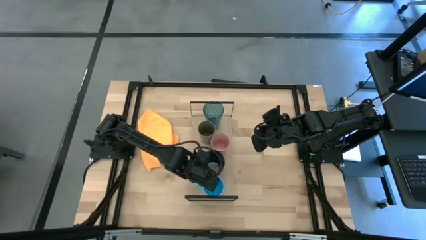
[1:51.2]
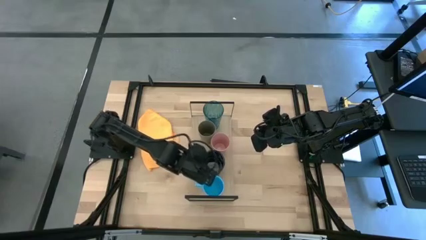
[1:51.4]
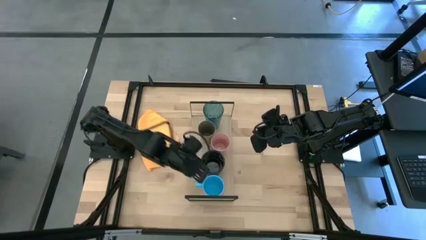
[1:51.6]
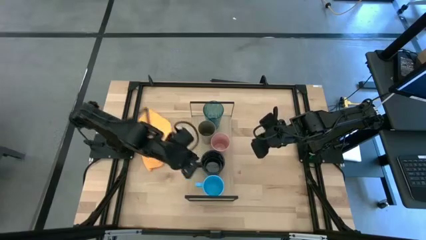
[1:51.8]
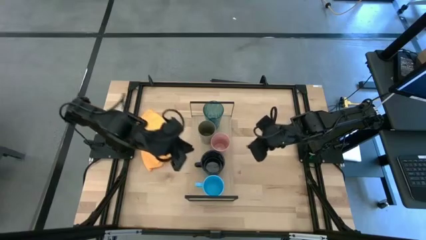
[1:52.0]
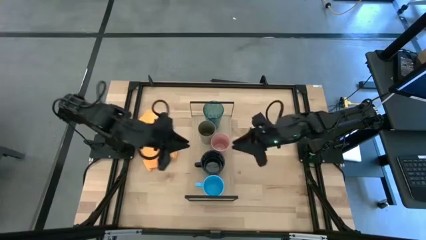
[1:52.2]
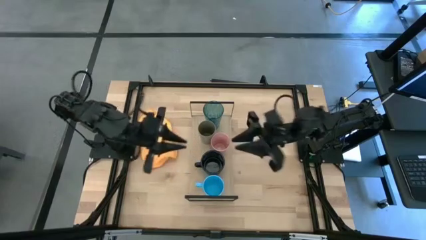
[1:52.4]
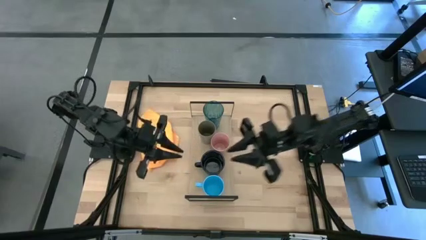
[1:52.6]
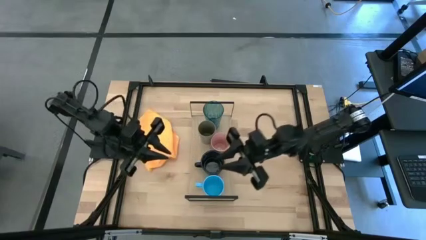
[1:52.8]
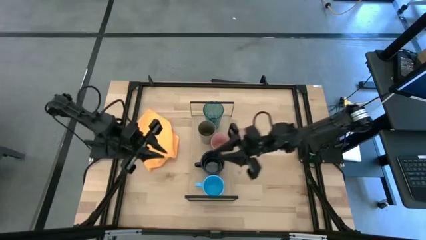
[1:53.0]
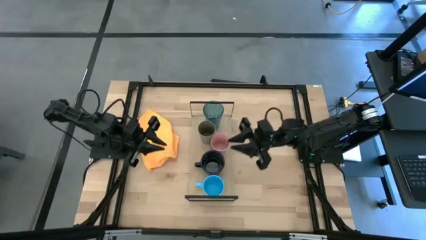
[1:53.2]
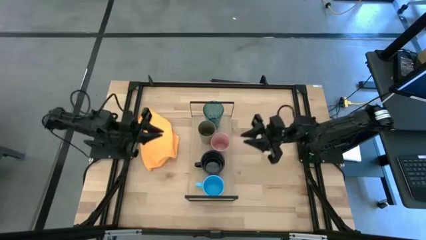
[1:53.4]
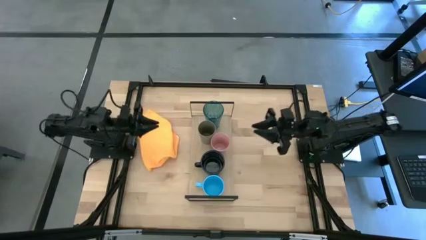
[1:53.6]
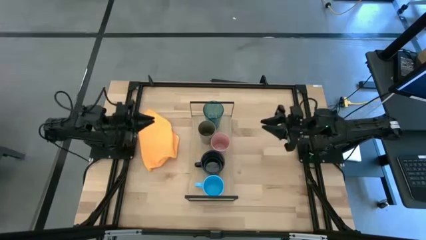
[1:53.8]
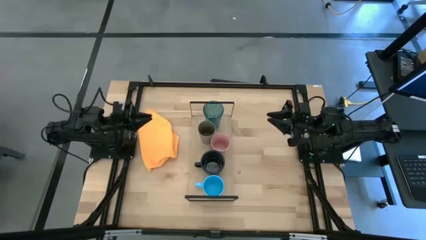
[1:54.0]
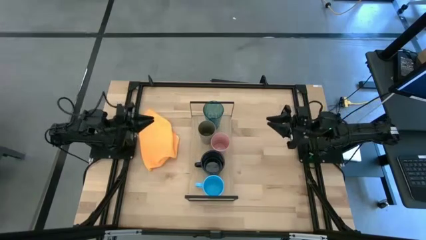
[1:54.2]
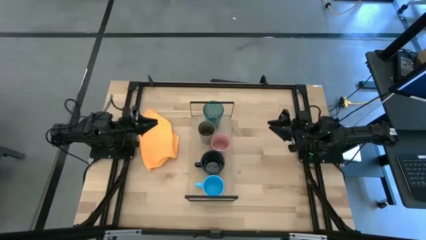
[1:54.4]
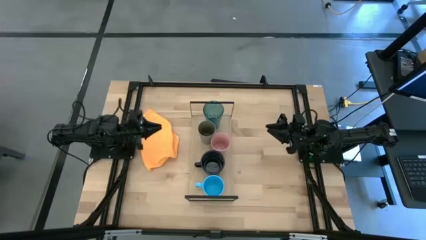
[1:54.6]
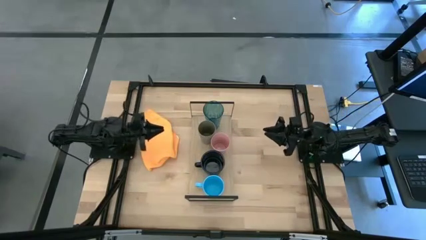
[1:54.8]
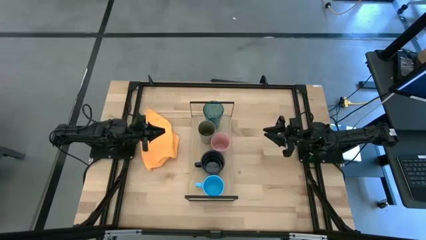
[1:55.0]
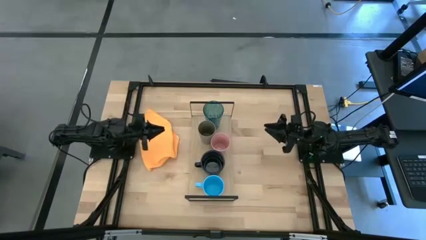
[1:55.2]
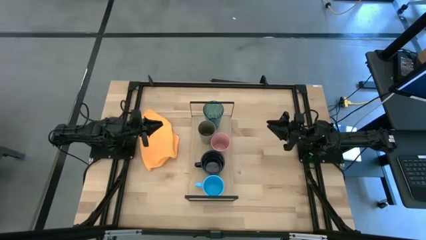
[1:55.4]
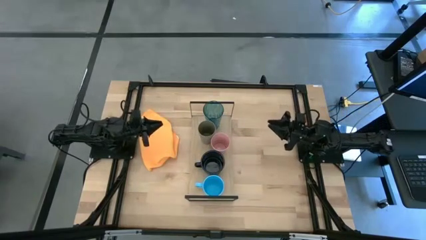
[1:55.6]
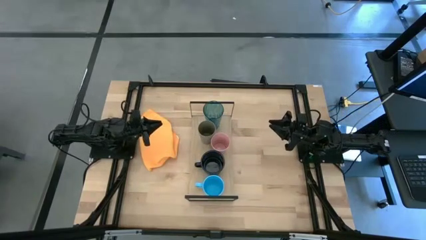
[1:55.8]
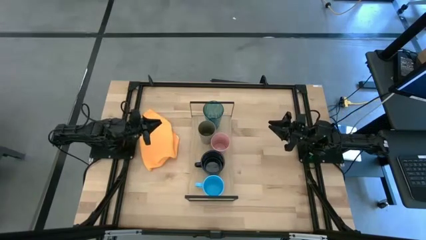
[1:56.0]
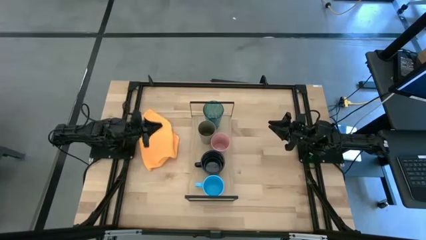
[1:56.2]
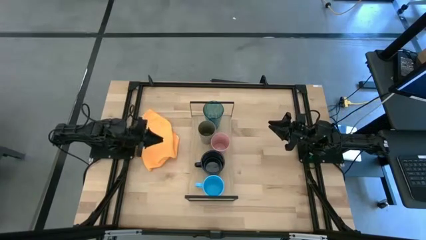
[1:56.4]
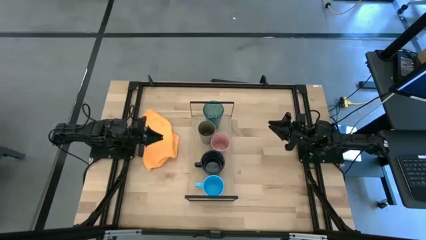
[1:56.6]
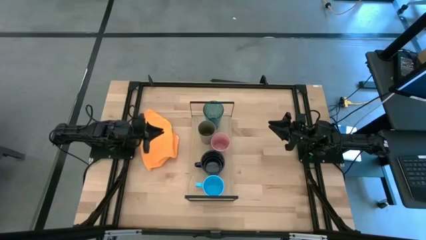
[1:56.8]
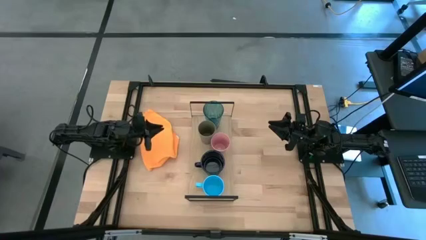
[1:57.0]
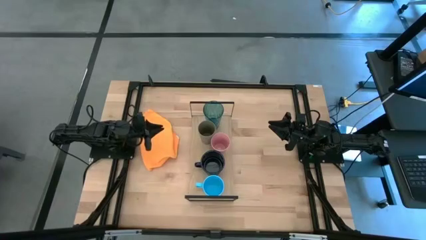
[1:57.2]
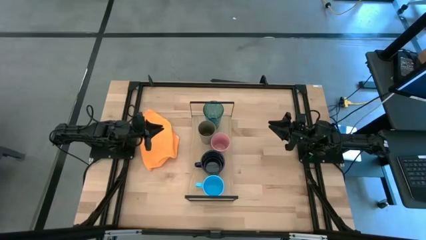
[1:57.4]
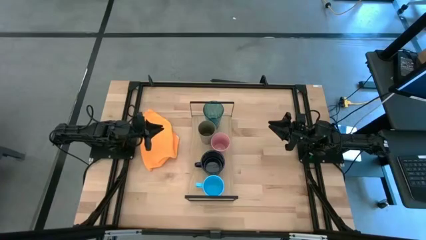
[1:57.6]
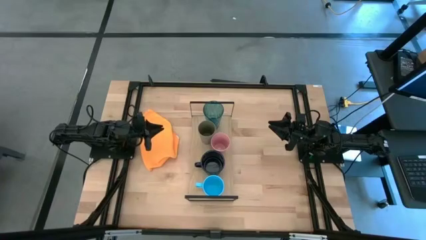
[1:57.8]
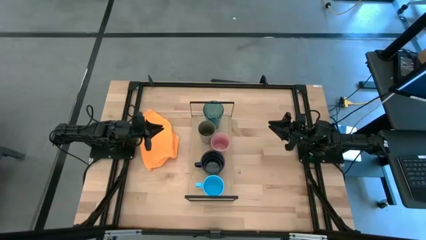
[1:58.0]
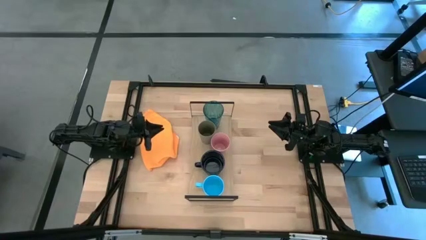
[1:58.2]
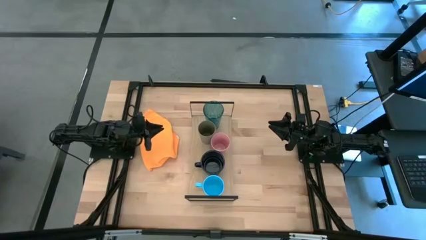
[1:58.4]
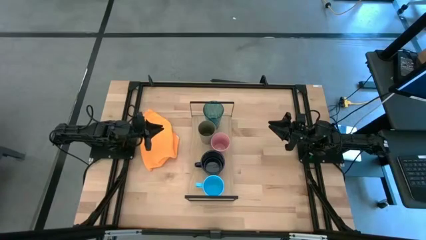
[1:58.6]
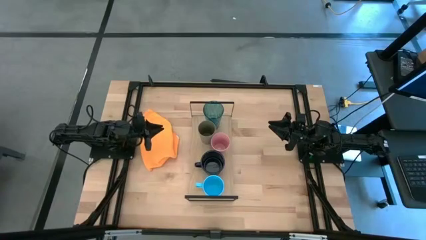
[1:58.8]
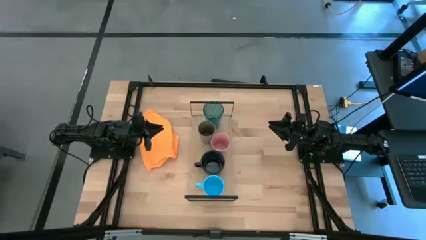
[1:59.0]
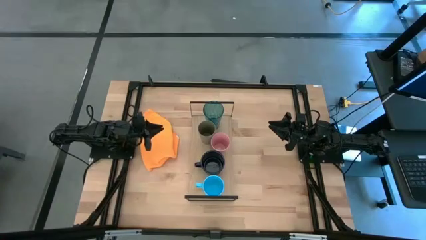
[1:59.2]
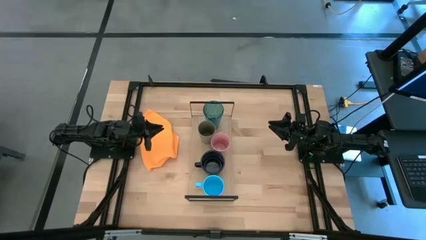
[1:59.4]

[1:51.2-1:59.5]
Task: Stack small to large cups/mugs on shelf
Return to Home Position

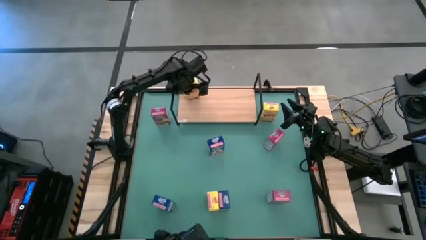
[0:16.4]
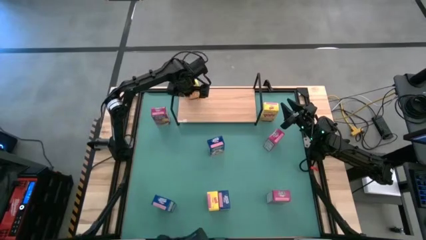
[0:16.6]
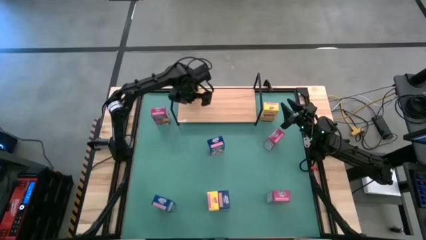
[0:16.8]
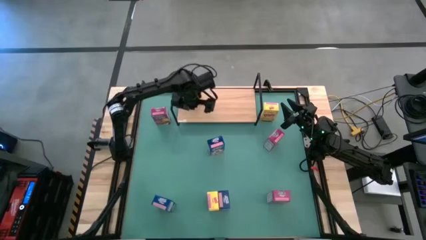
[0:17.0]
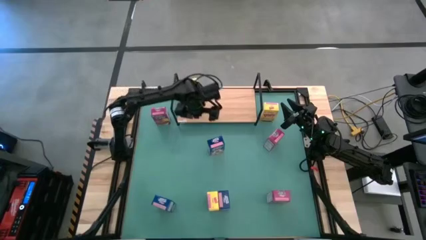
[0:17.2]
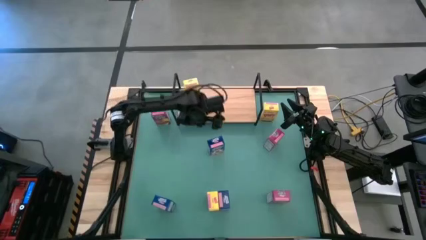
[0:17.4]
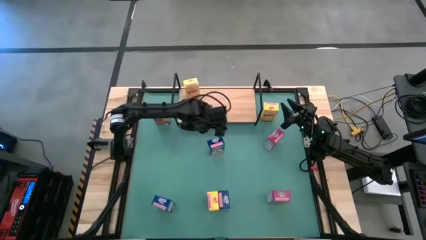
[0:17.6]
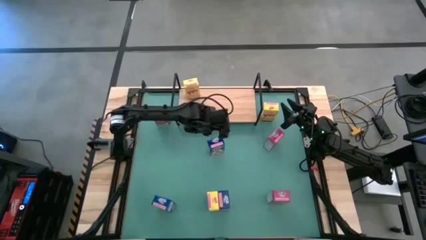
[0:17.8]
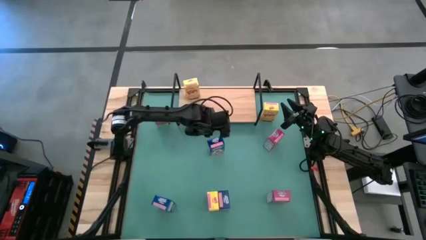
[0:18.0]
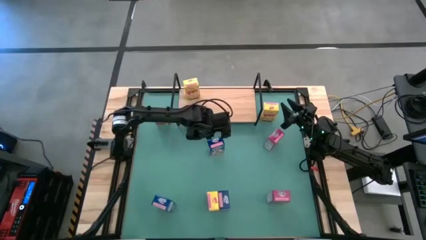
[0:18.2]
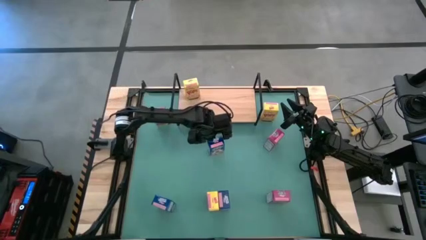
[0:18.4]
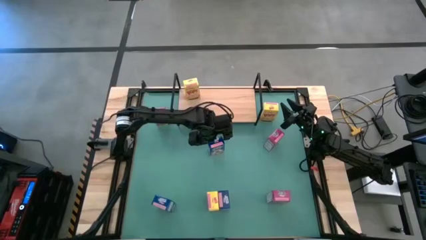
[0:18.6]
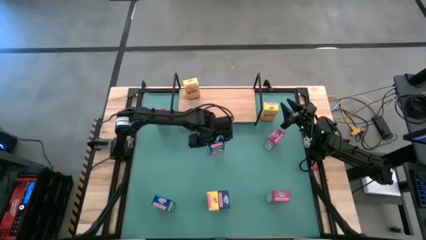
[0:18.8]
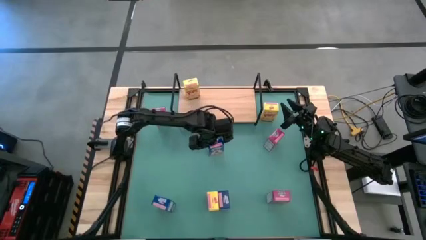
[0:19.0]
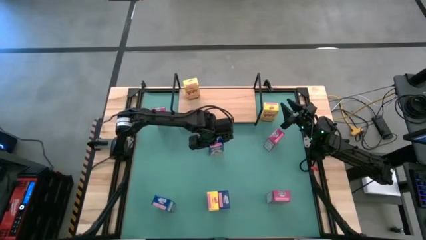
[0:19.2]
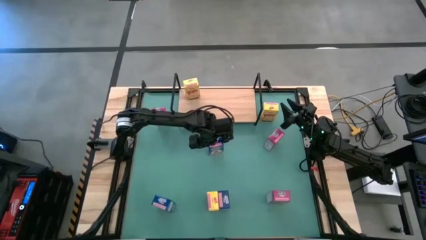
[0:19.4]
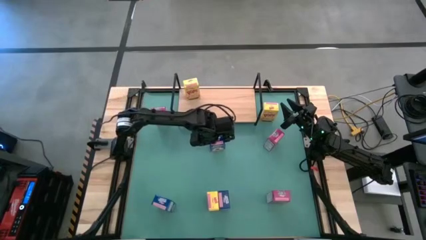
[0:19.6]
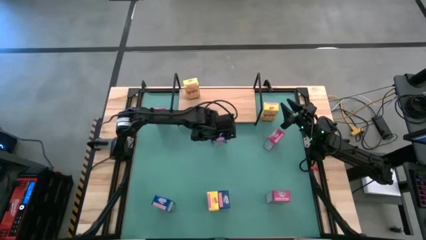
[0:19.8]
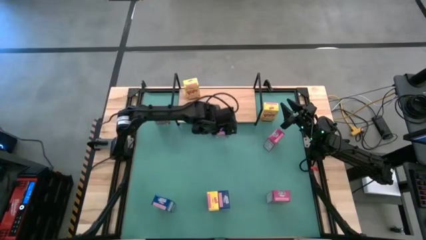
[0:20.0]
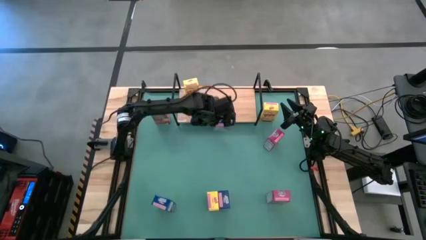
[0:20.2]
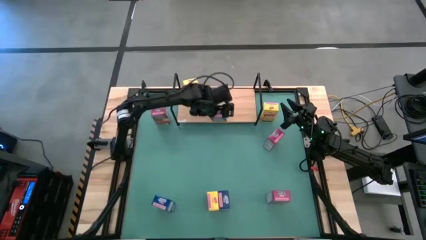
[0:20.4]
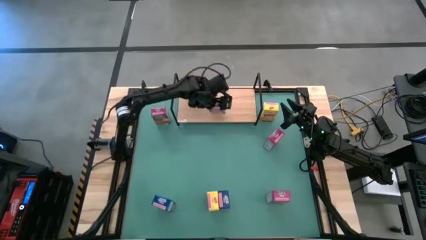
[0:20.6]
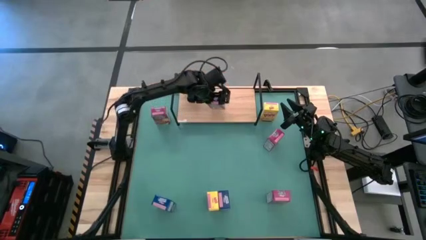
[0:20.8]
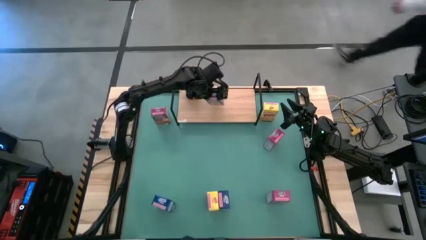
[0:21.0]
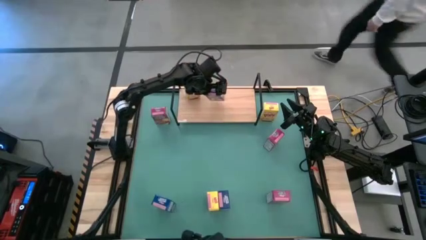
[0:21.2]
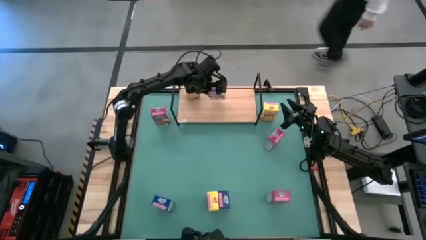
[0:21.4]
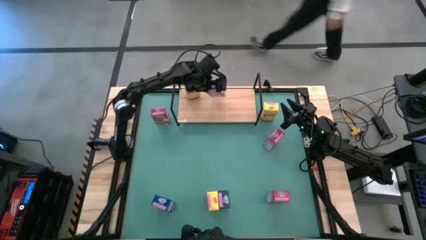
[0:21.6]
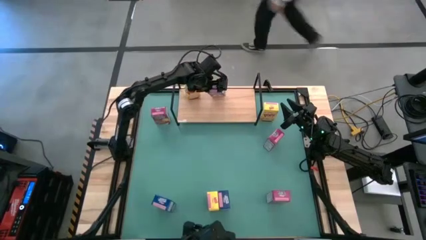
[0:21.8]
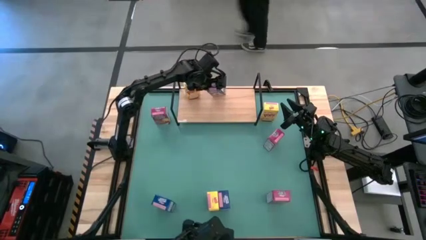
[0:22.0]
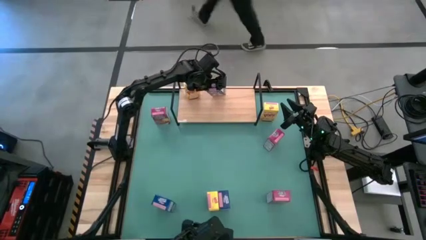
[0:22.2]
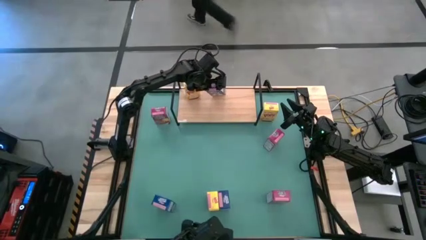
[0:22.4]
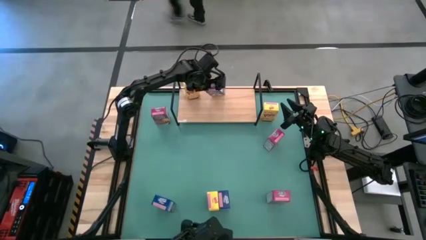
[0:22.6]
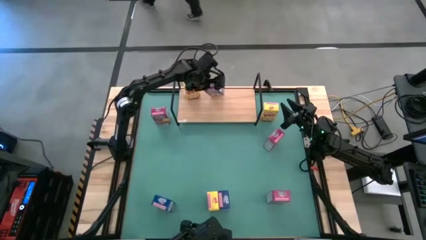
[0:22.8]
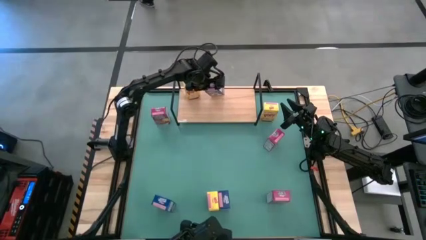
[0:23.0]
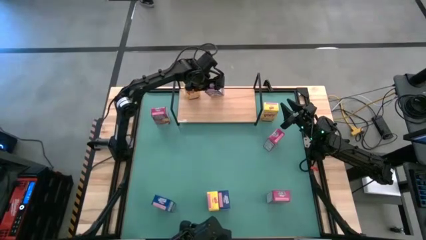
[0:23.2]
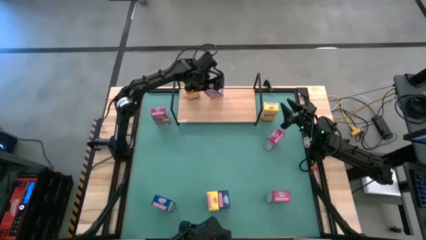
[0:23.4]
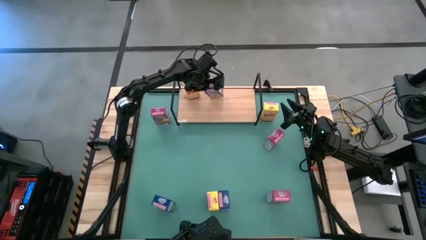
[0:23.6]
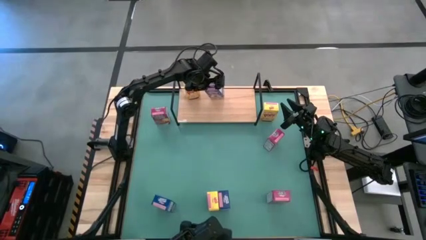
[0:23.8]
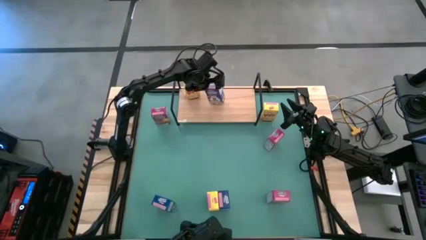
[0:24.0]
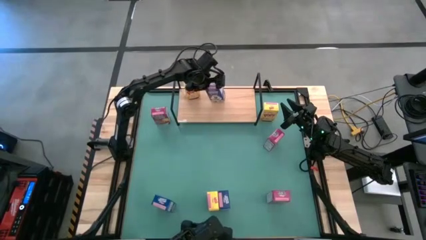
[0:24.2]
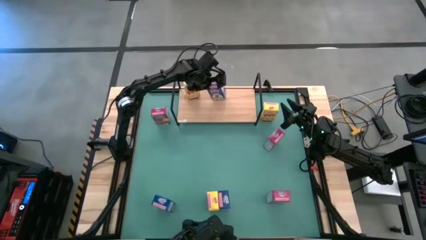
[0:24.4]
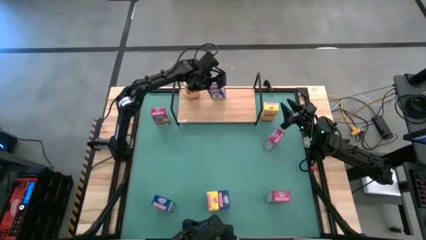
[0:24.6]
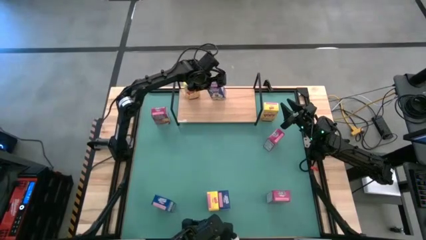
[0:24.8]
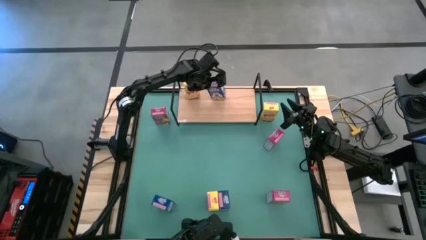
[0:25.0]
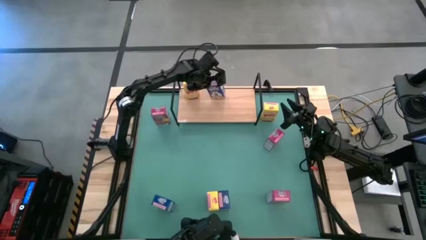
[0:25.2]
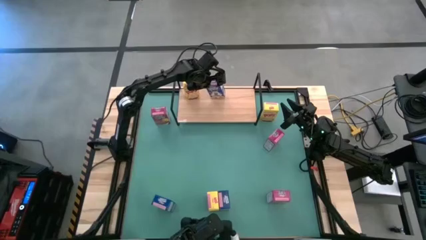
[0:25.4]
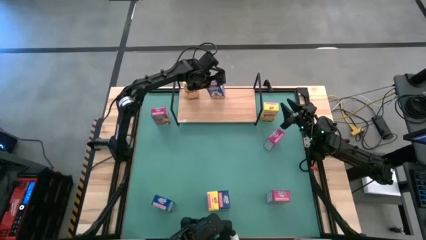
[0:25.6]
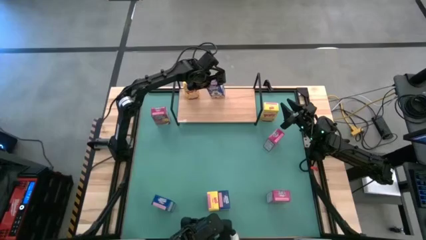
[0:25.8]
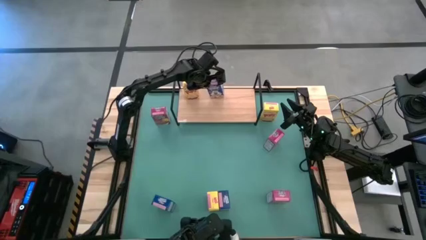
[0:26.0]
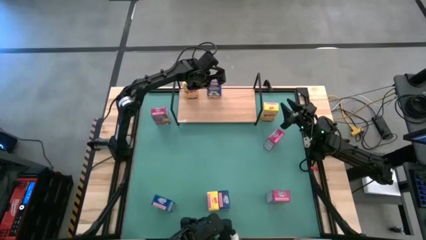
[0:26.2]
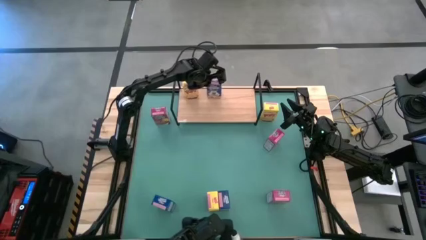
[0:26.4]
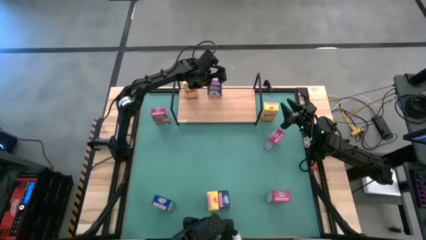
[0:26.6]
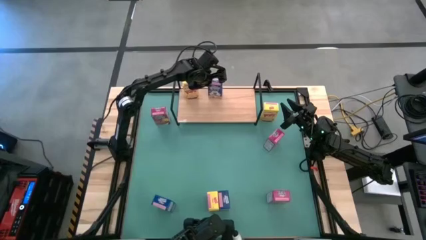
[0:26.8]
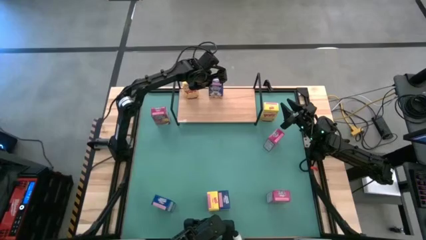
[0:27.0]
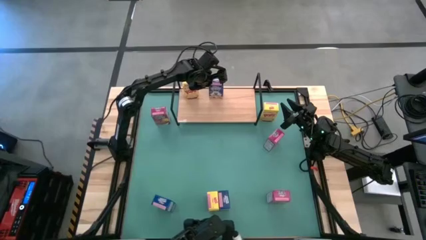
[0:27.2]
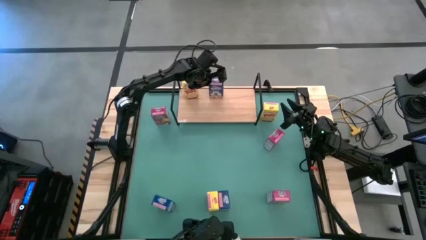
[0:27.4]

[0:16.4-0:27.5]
Task: Stack cereal on shelf
Put the top blue cereal box on the shelf
